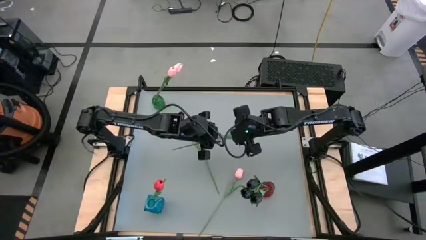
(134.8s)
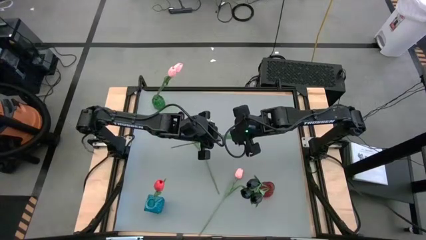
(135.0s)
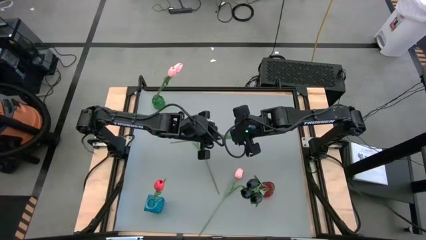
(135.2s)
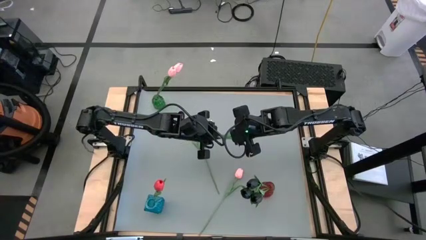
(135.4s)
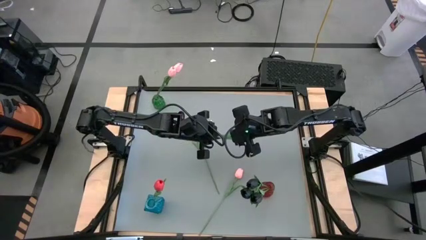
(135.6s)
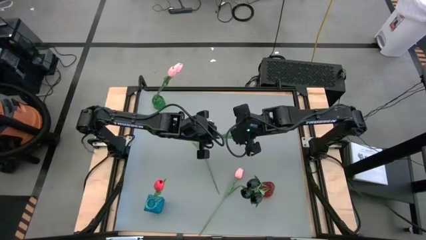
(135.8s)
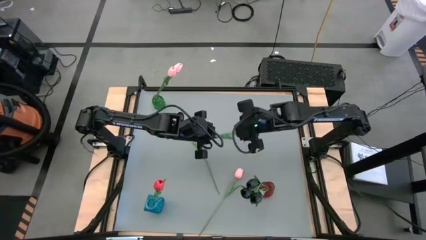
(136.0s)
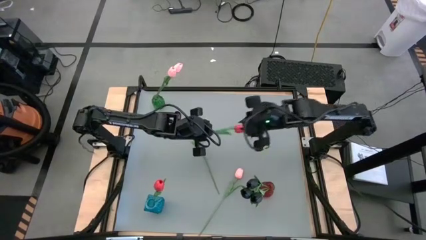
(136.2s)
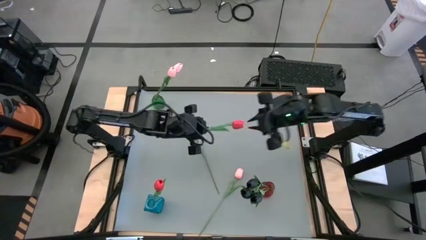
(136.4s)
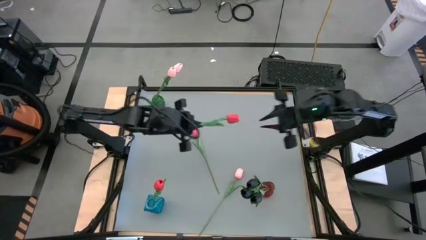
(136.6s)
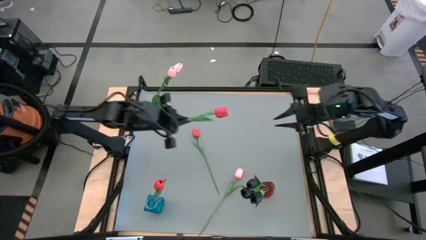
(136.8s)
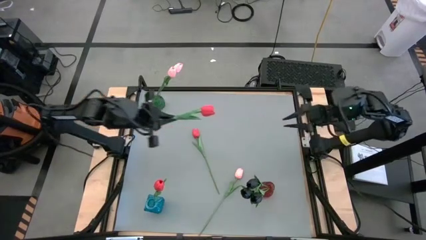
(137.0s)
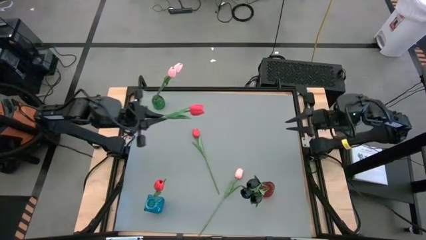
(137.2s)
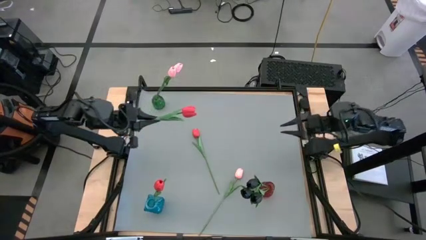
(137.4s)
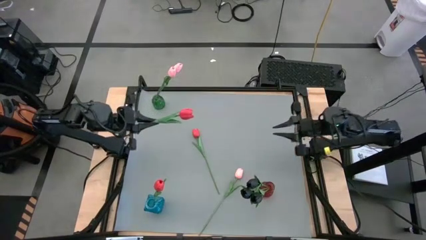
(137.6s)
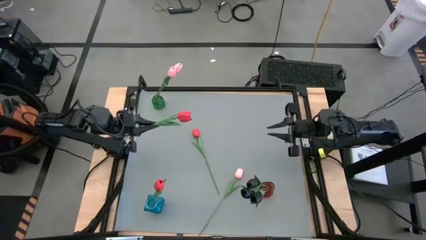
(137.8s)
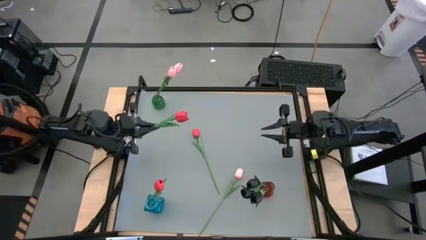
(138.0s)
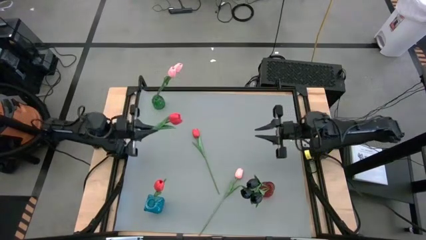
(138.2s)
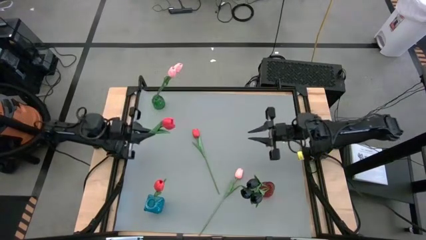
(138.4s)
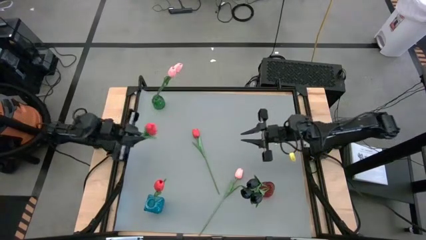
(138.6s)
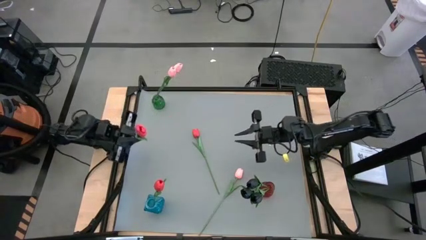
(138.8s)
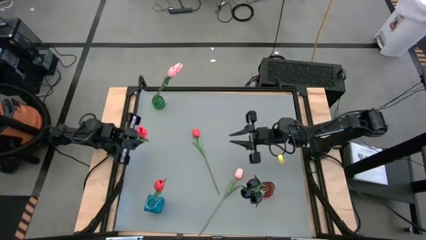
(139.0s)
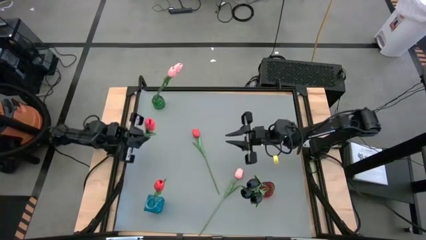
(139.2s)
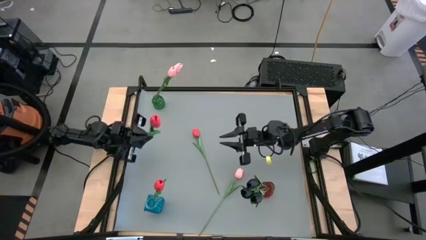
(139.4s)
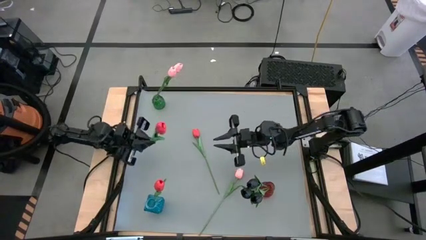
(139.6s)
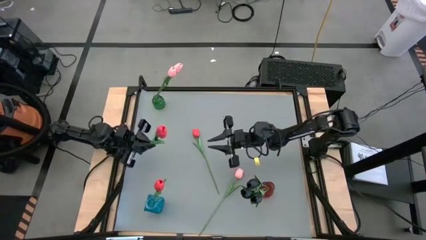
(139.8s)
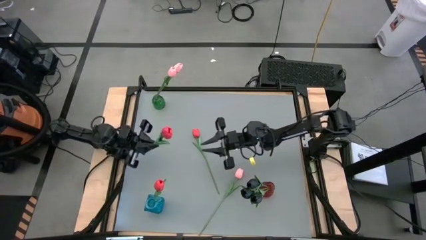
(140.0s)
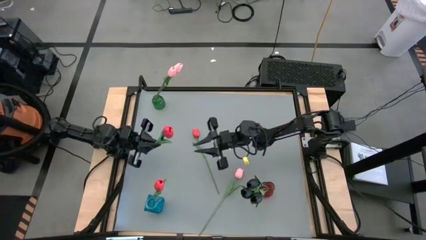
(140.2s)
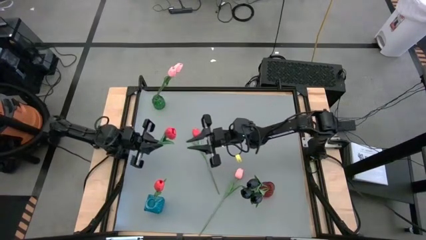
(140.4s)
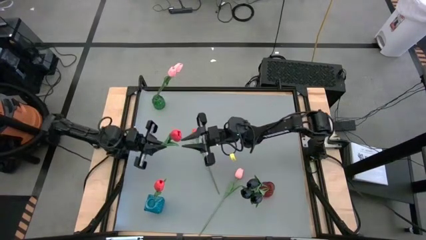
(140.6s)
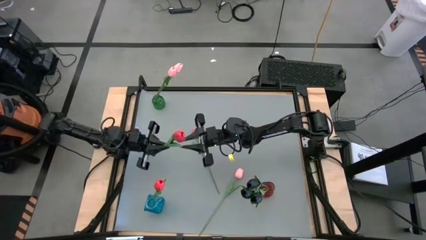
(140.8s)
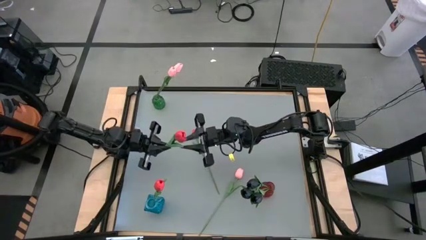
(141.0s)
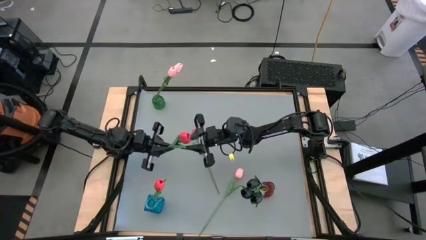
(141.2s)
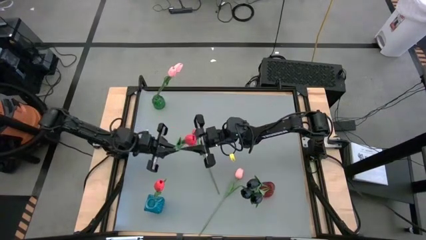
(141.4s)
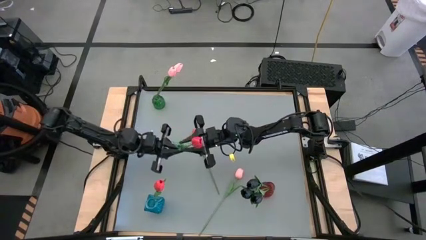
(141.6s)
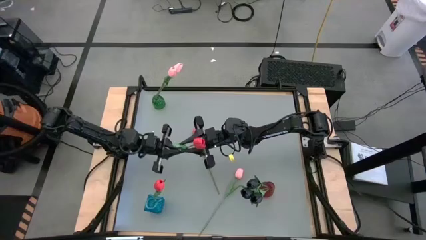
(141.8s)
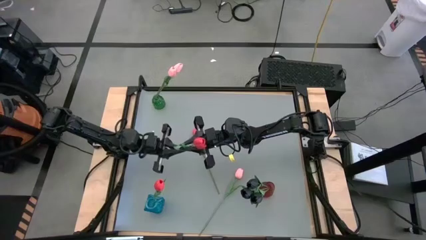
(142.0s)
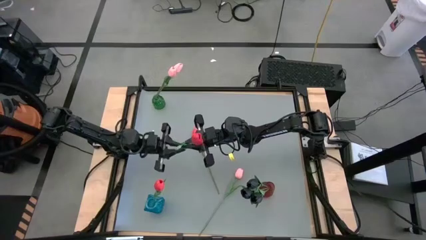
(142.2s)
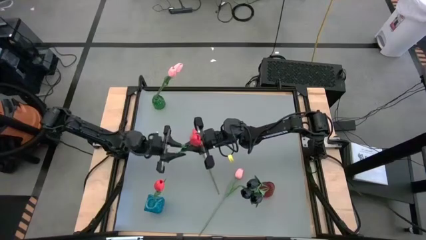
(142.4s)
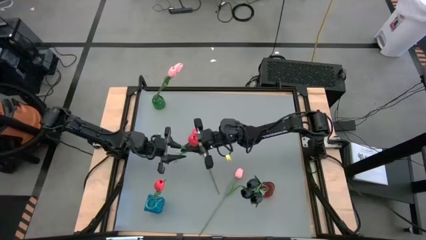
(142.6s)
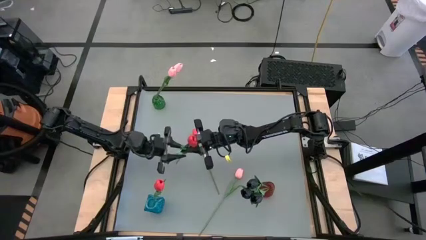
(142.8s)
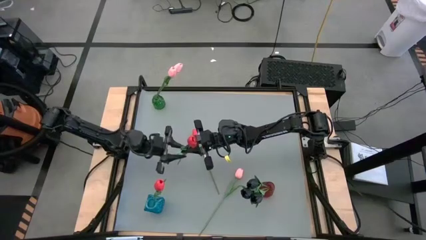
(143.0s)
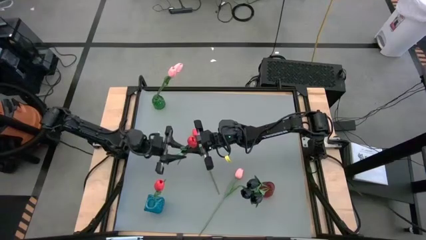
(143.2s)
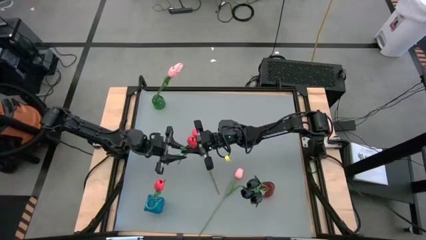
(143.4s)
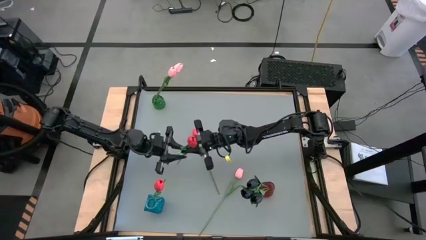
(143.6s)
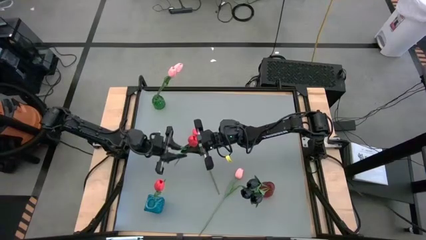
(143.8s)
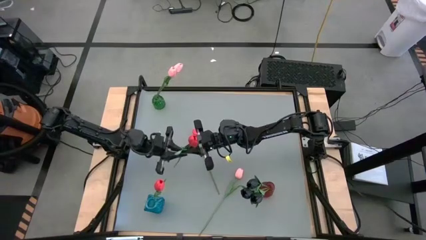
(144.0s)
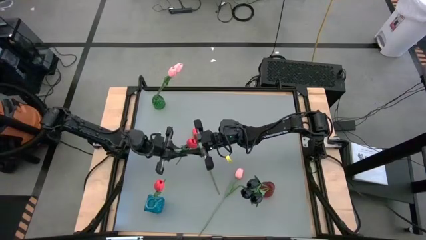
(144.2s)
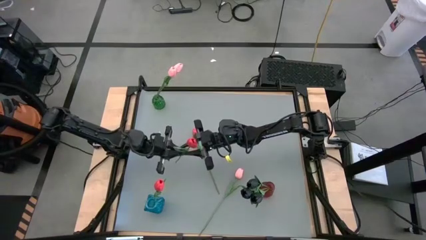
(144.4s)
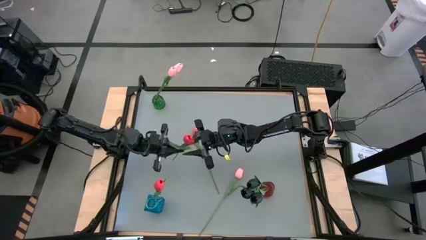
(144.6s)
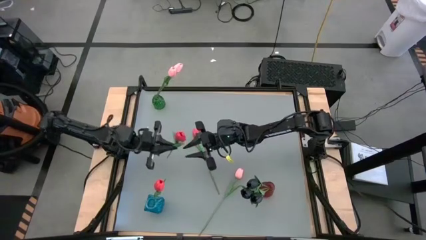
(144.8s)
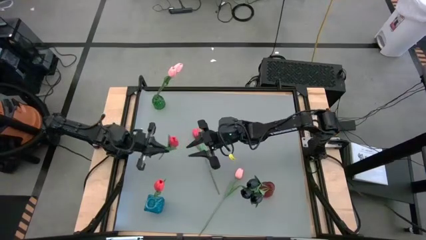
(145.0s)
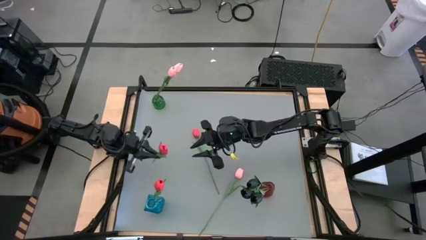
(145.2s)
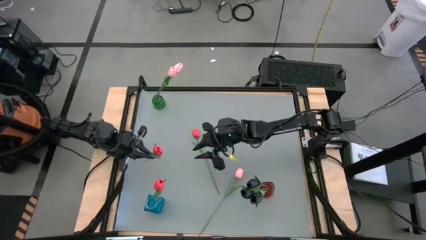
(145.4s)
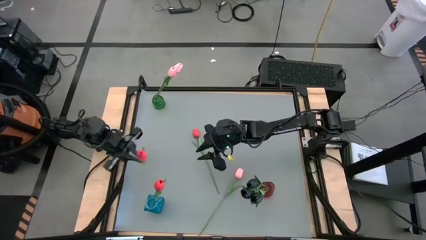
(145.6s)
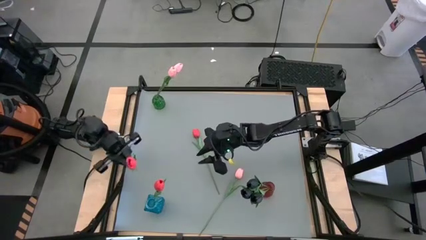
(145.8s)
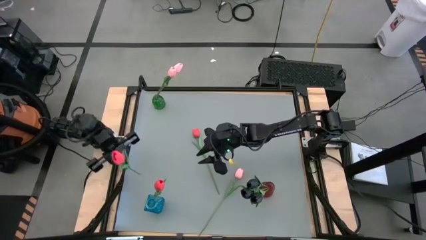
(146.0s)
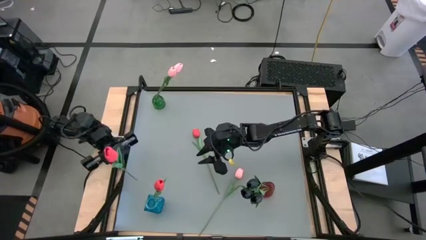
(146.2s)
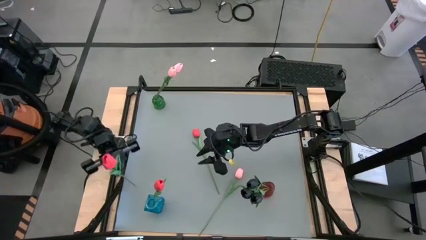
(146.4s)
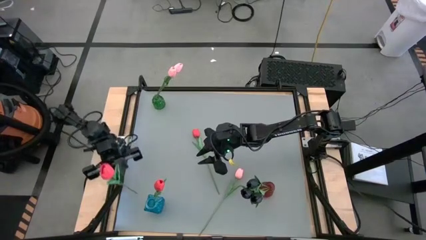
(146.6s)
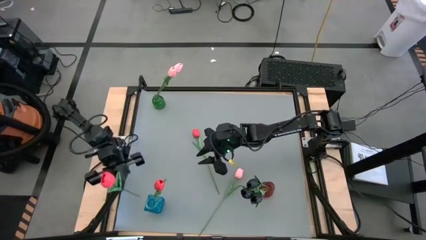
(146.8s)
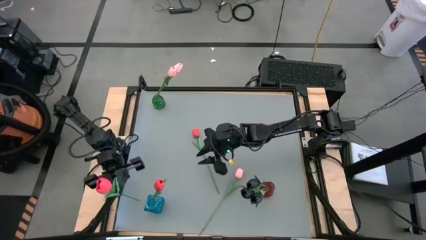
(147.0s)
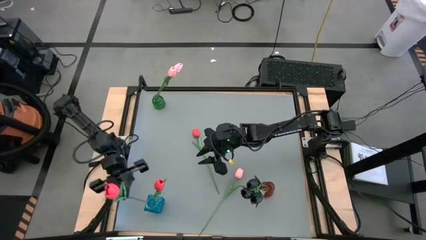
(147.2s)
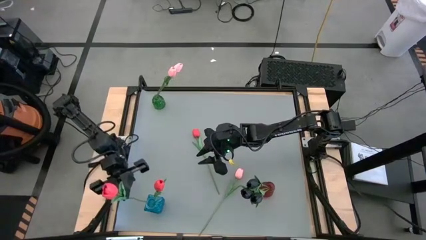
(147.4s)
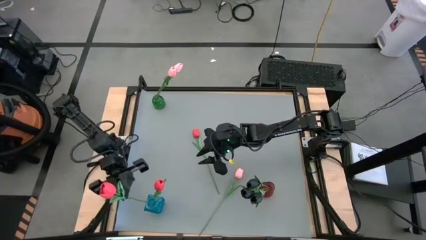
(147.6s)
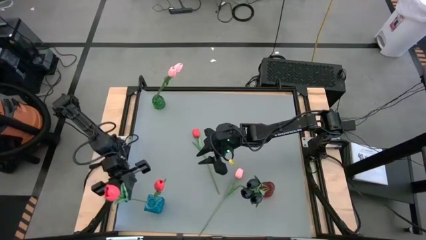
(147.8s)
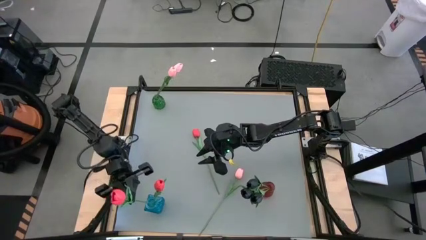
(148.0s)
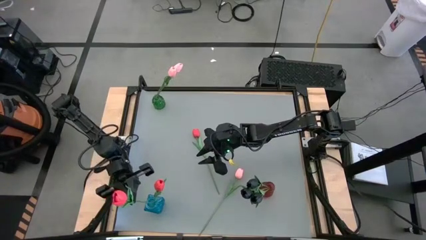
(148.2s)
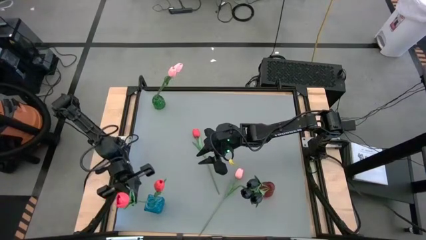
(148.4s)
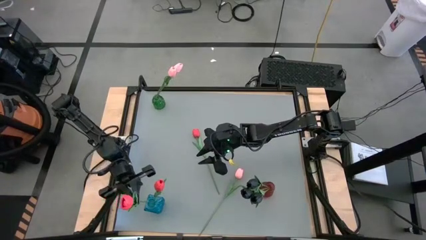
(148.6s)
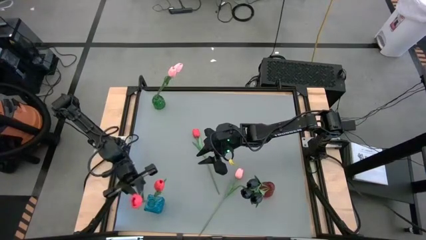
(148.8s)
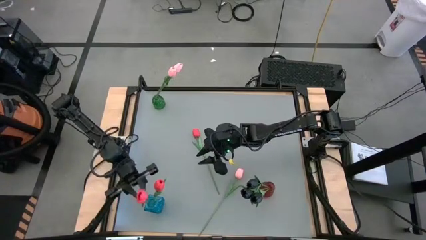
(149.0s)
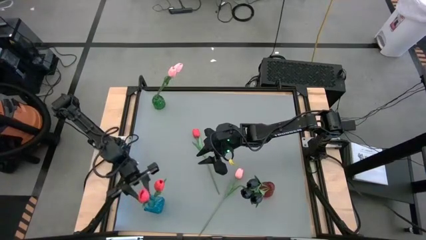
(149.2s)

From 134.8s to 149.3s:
Task: Sort flowers into vase by color
Put the right red flower into the blue vase
